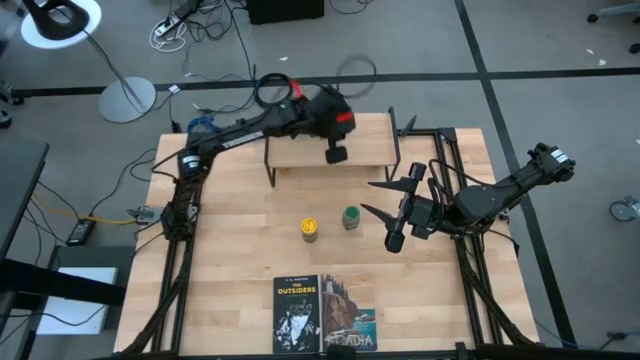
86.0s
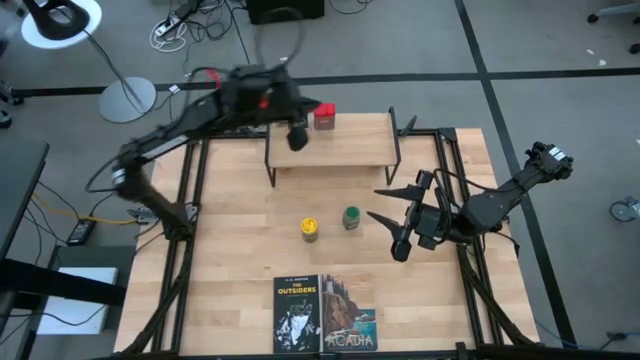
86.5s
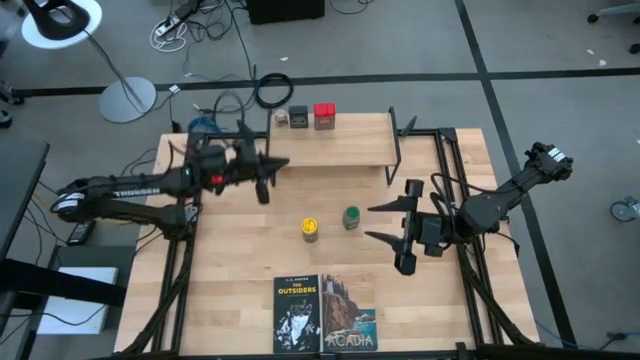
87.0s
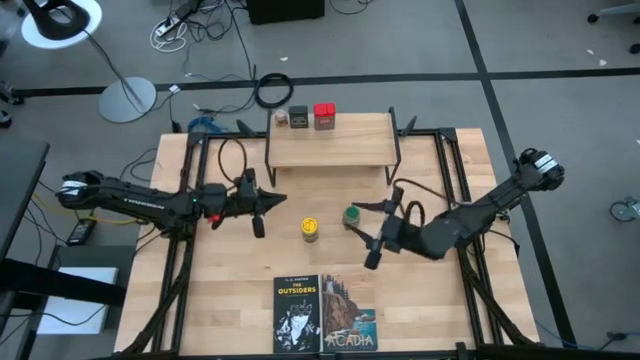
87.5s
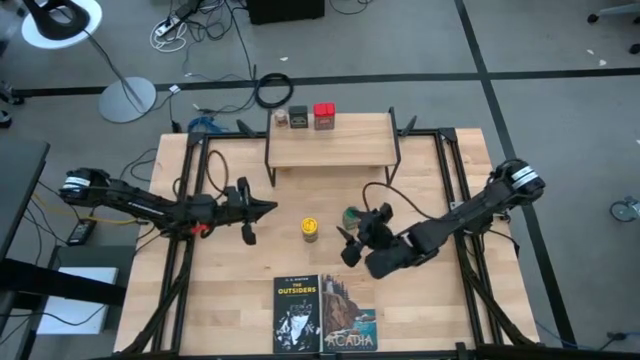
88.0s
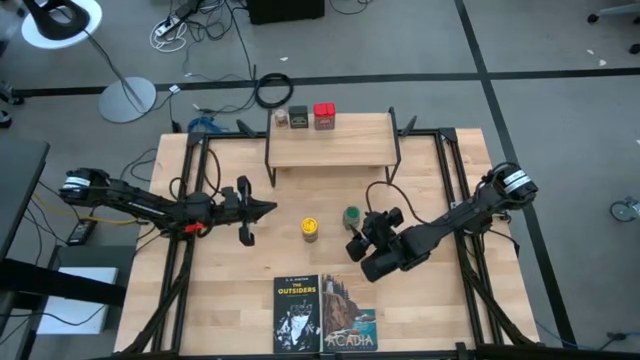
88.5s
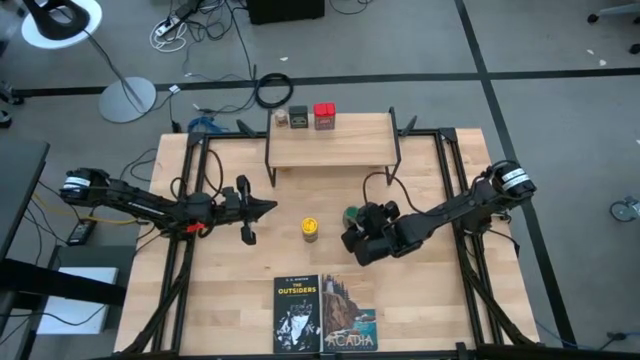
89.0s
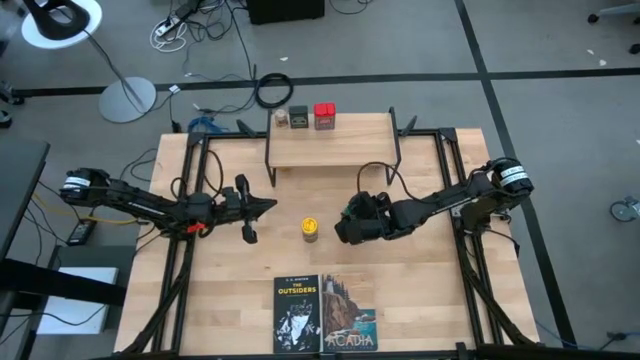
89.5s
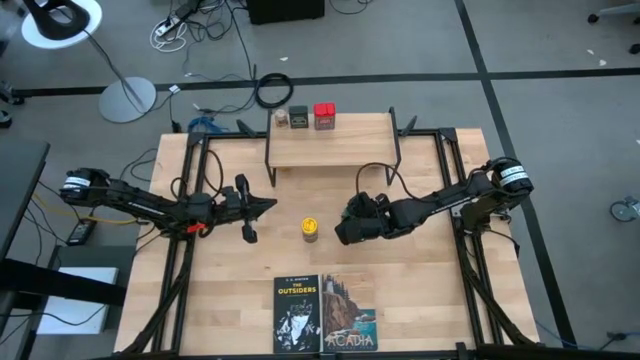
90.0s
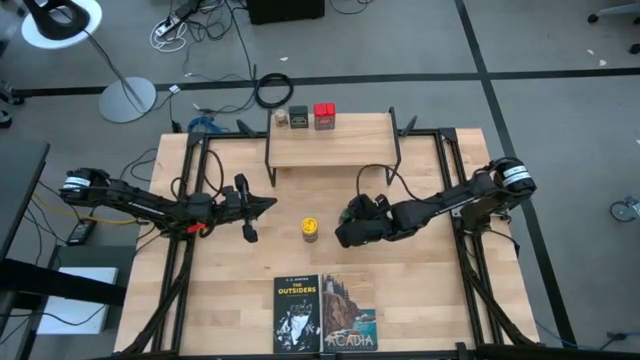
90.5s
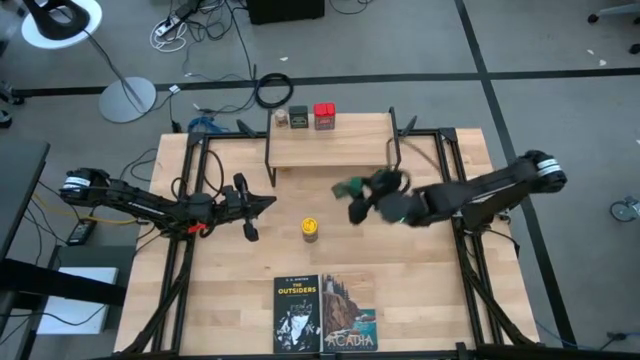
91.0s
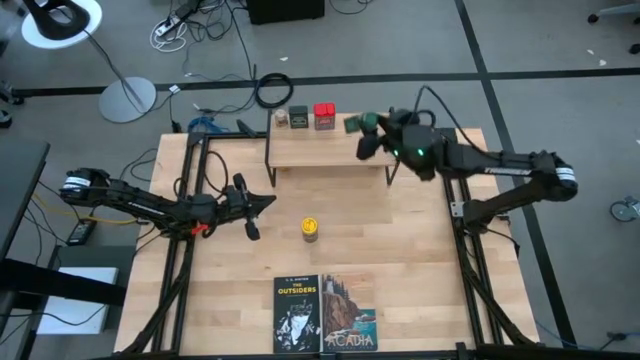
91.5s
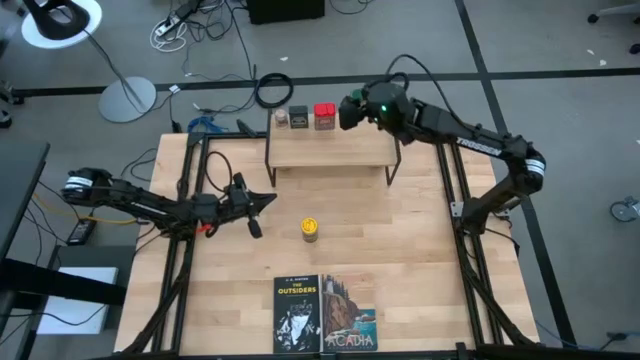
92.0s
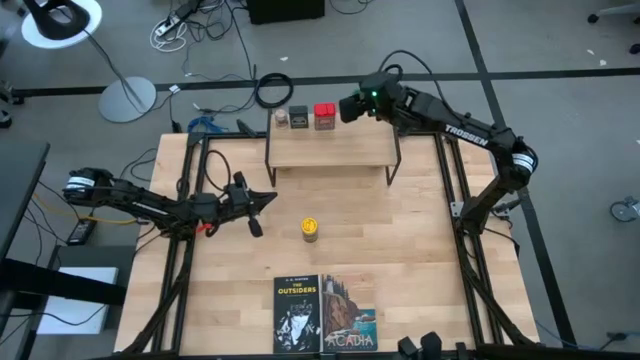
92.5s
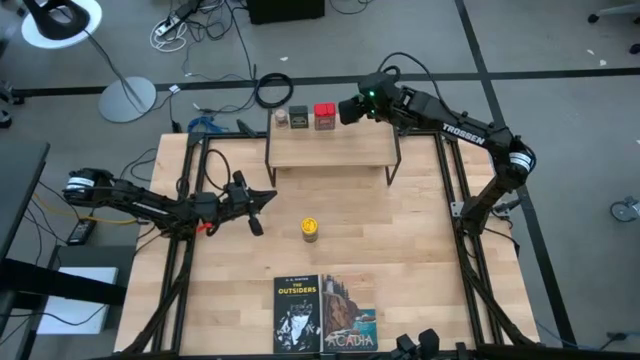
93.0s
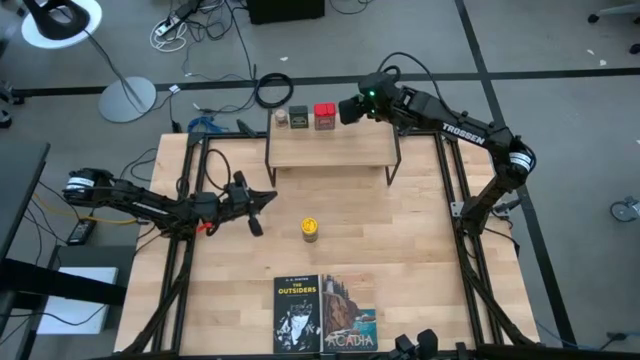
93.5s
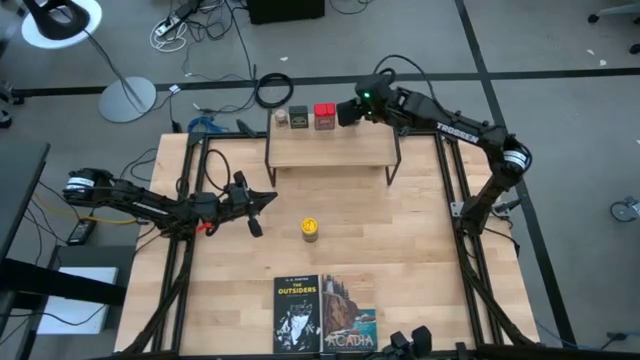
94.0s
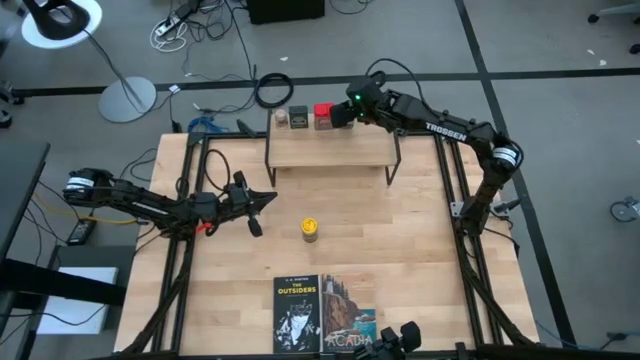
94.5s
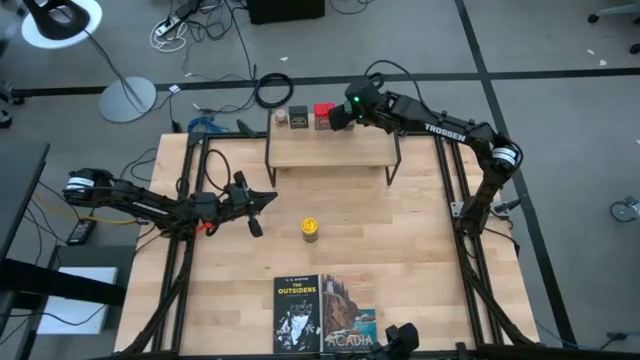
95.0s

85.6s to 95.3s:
Task: Shelf spices
Put the green seasoning bottle on the shelf

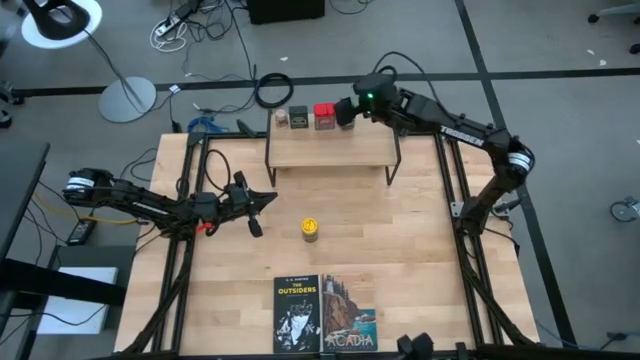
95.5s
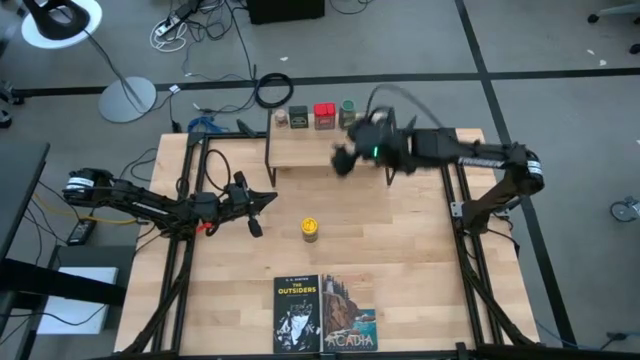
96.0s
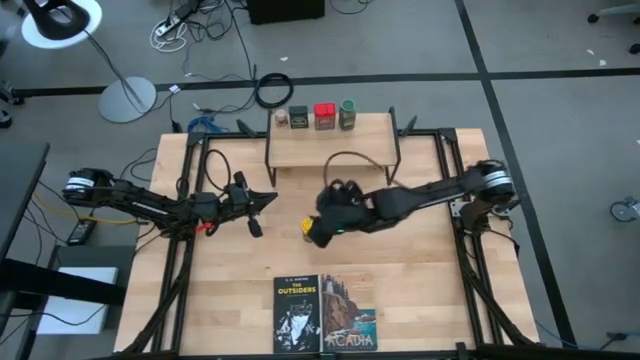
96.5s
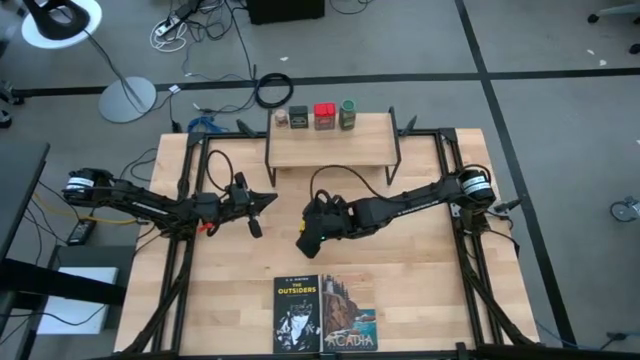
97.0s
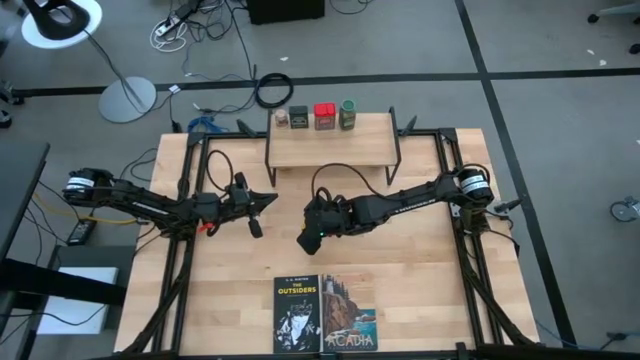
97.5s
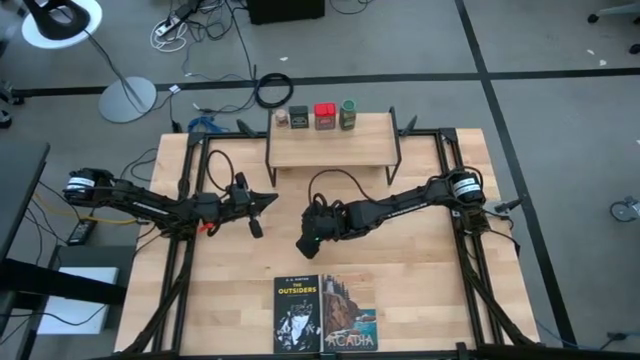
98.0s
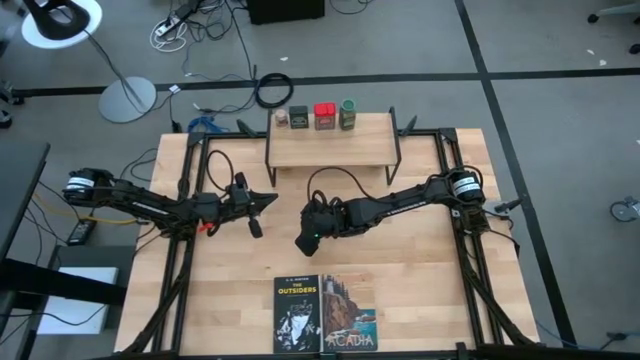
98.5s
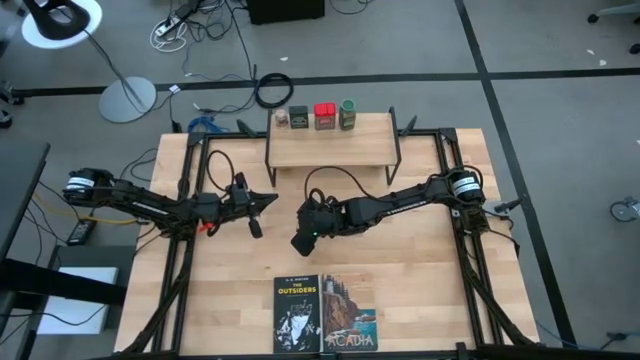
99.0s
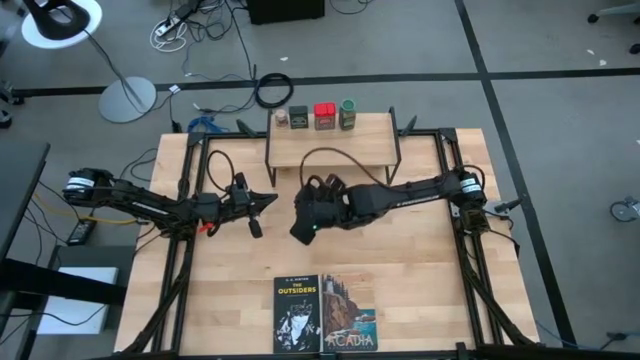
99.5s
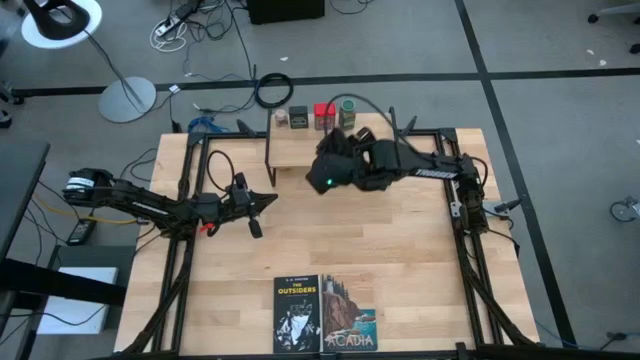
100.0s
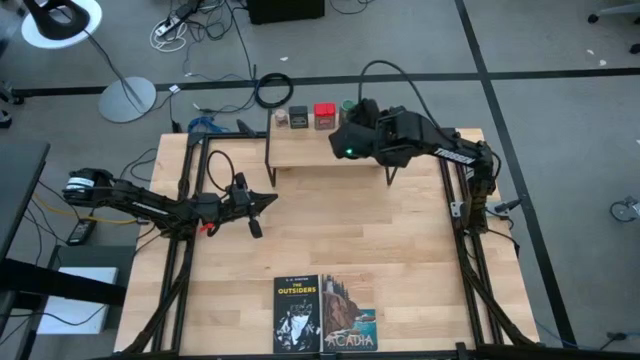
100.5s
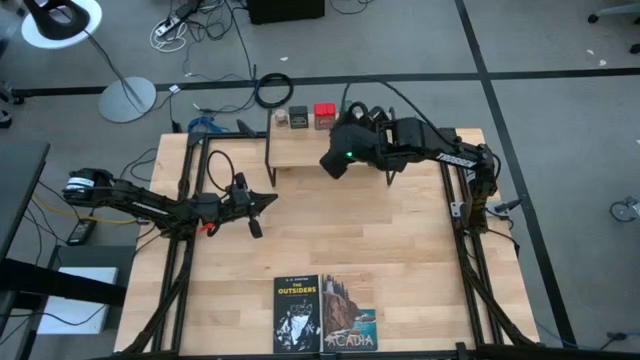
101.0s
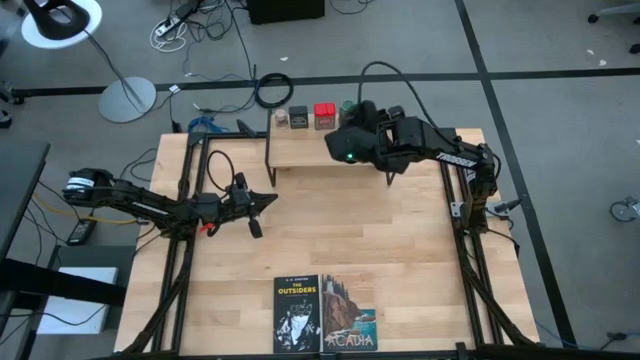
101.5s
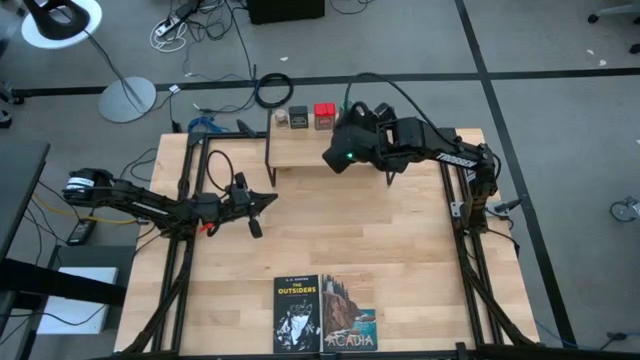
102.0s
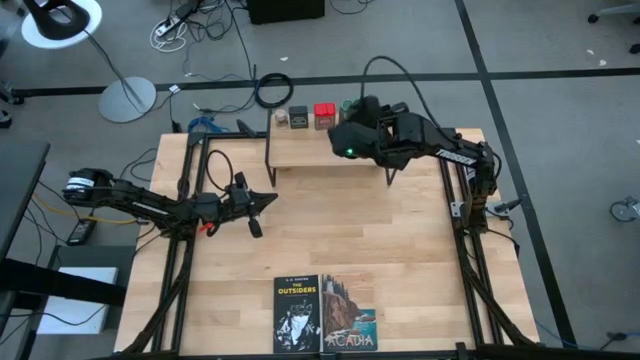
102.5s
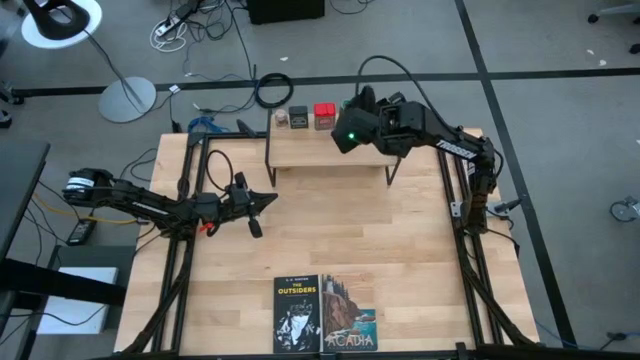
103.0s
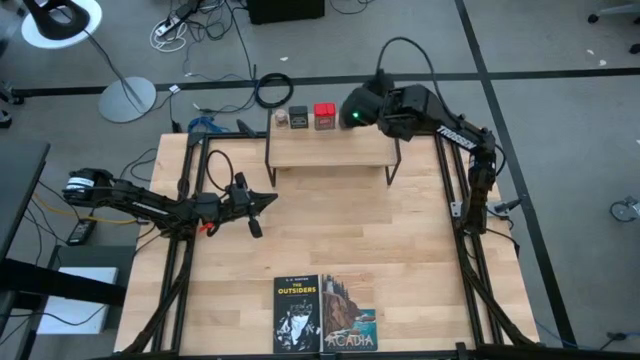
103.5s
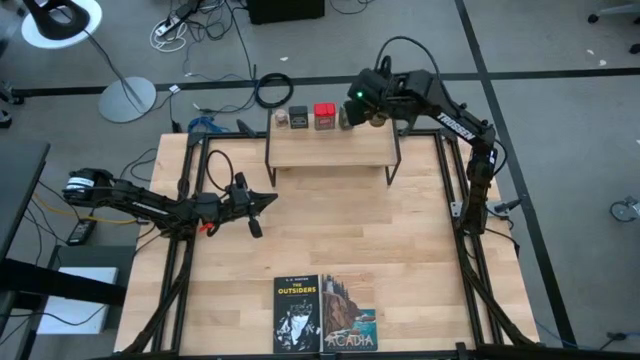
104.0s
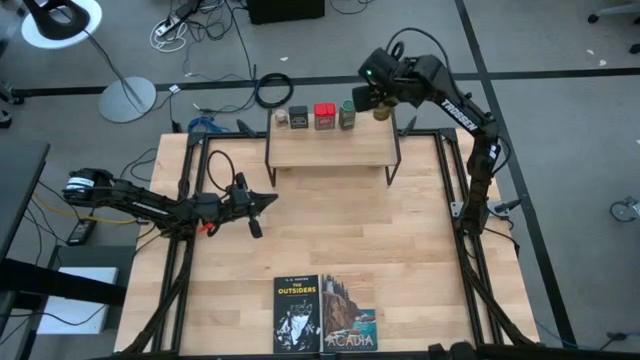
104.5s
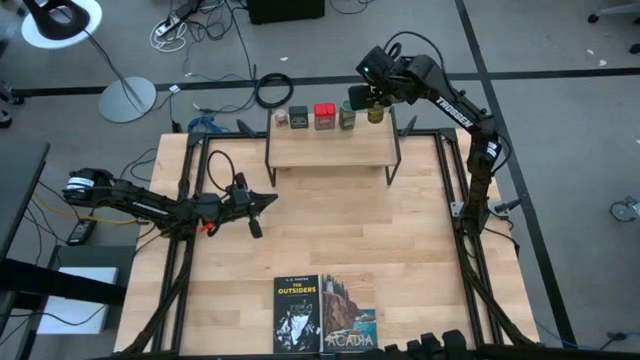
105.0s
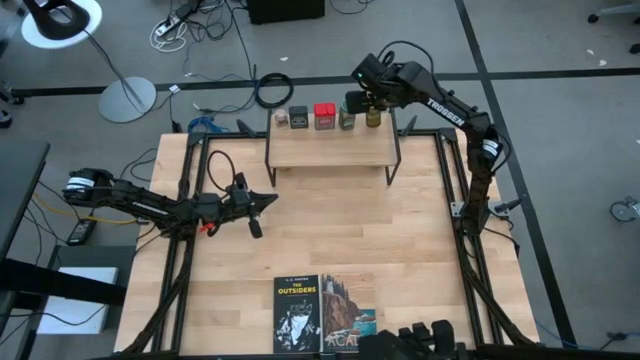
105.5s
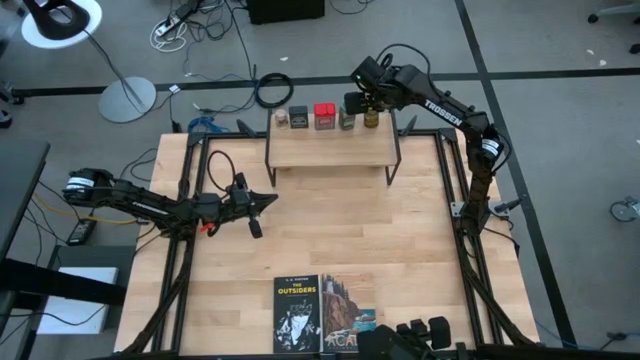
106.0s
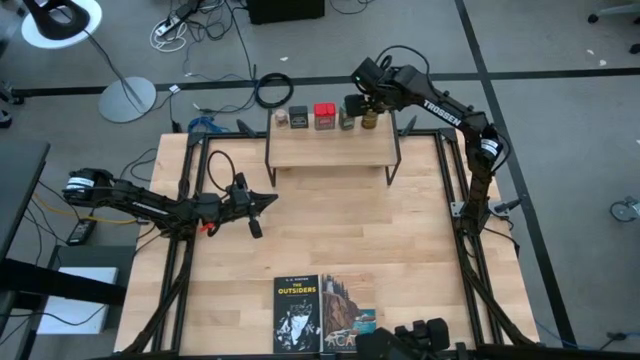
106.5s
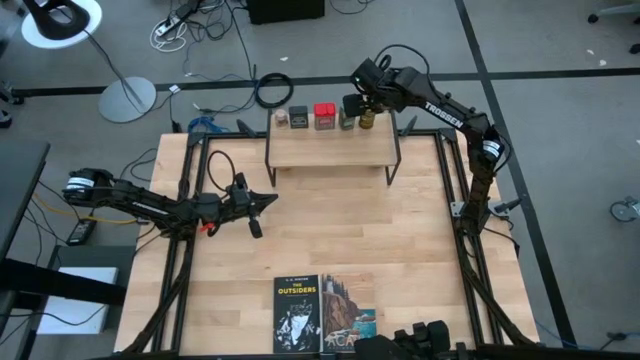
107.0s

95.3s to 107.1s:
Put the yellow seasoning bottle on the shelf
